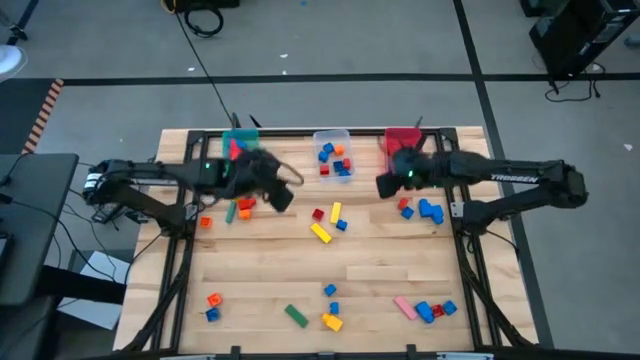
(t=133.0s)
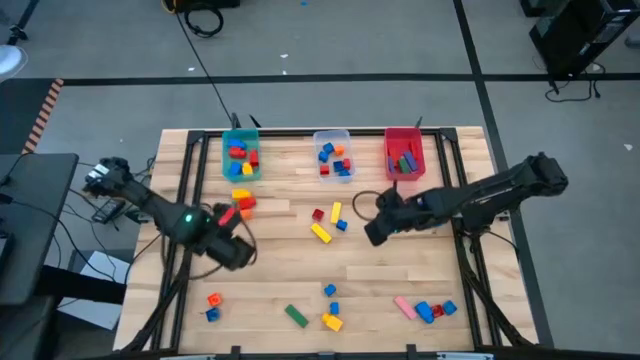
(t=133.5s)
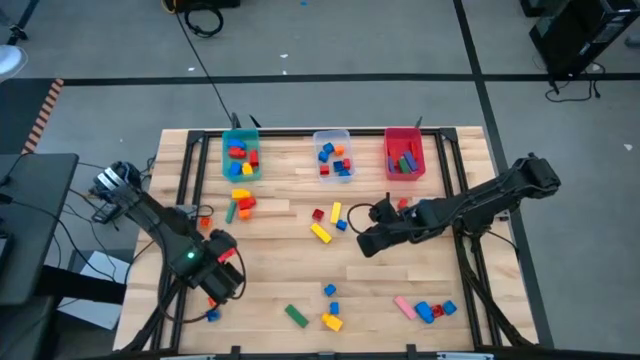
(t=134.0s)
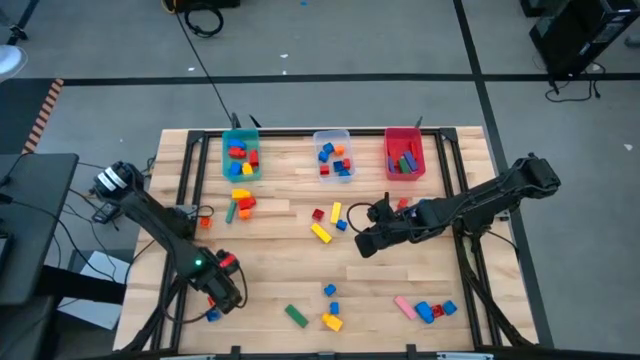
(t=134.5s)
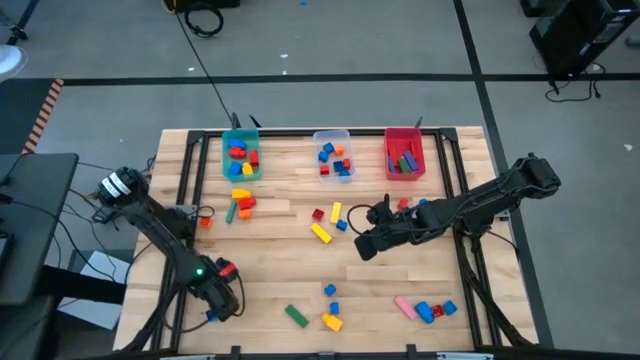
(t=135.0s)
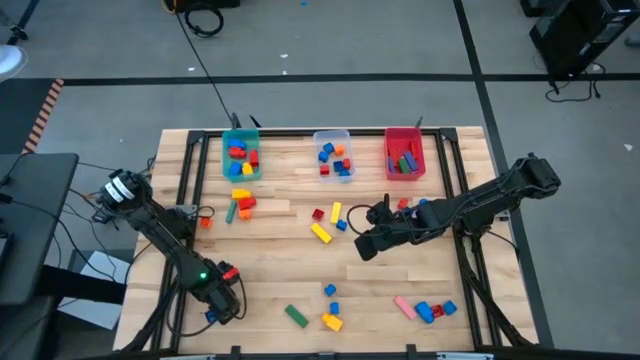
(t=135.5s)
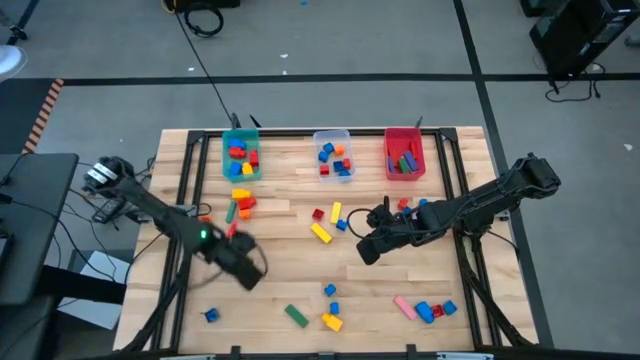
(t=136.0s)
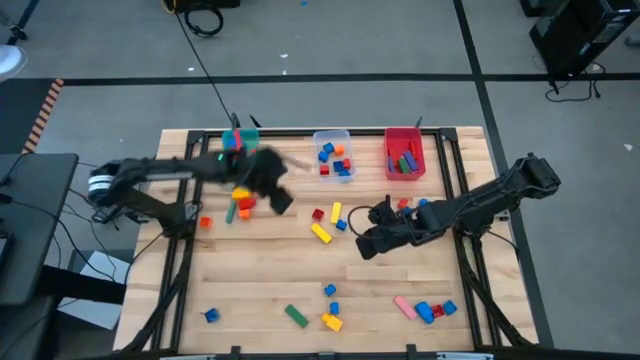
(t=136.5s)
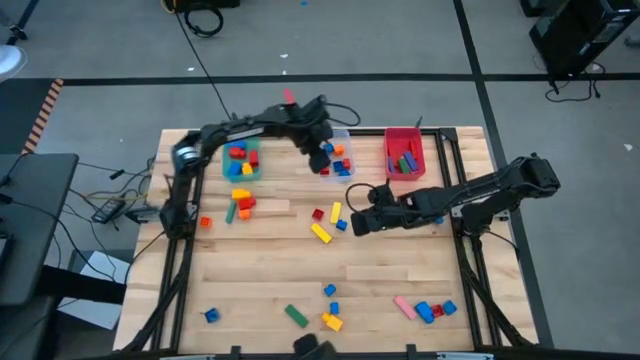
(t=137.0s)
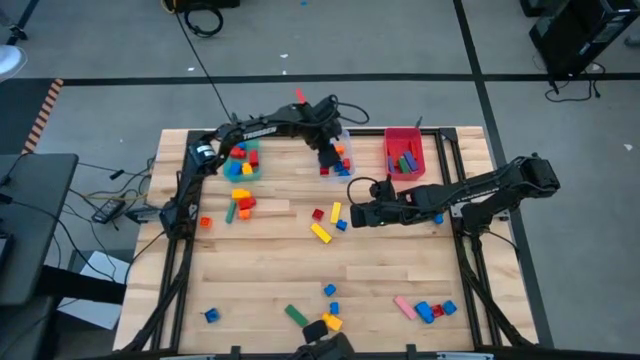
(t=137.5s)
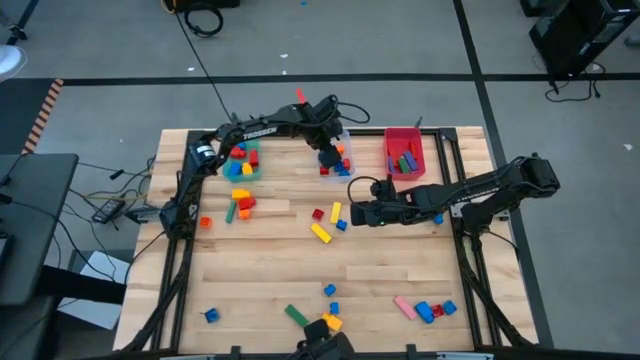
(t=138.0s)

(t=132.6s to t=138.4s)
Task: Sort blocks by size
Put the orange 4 stud game piece into the transparent bin

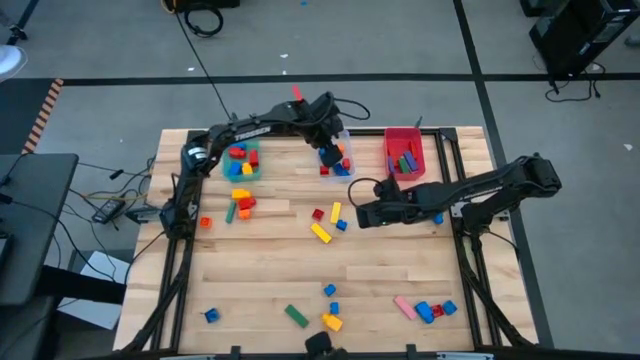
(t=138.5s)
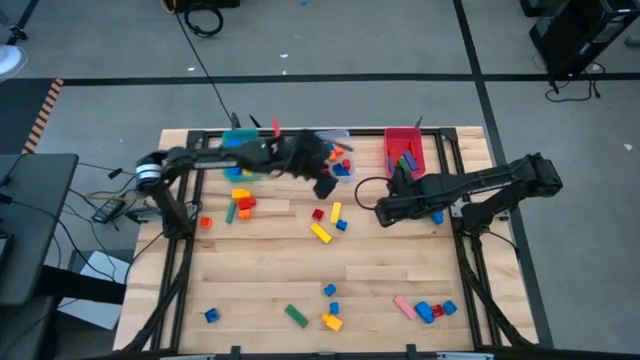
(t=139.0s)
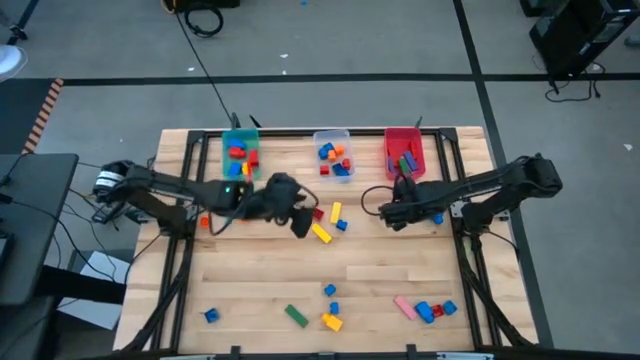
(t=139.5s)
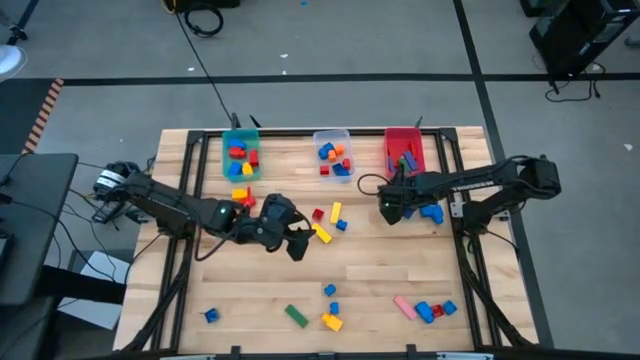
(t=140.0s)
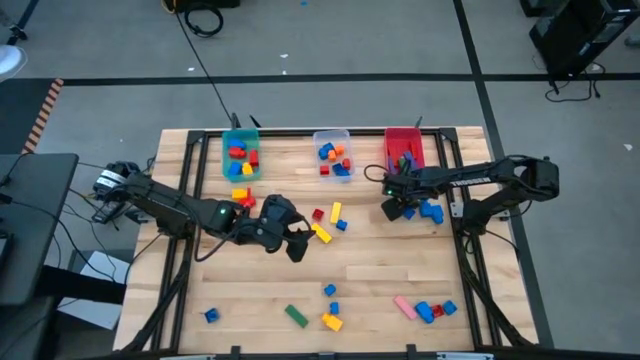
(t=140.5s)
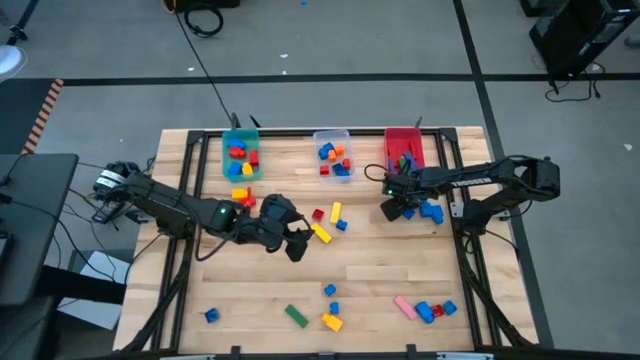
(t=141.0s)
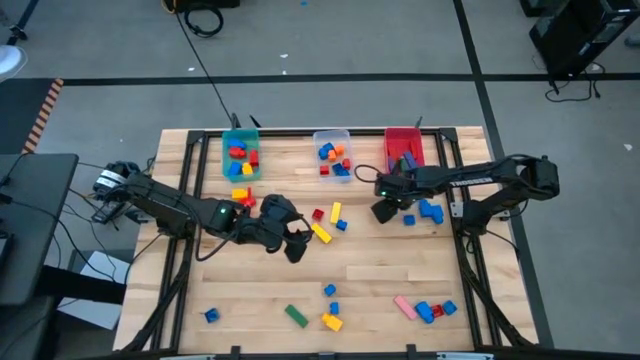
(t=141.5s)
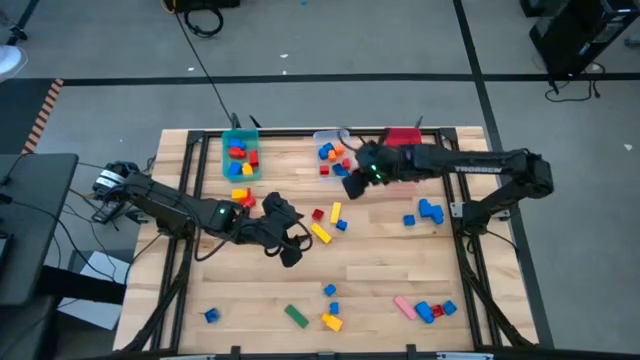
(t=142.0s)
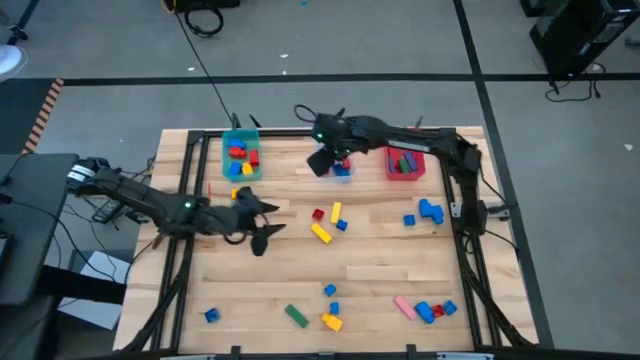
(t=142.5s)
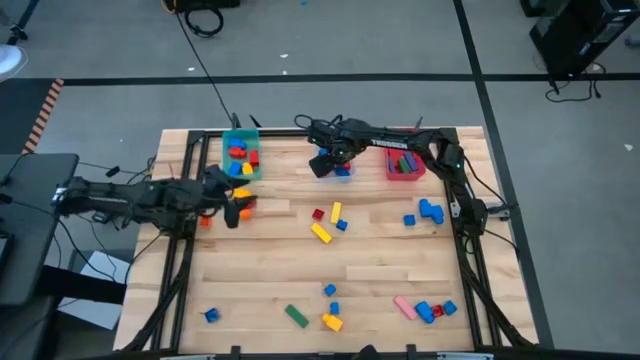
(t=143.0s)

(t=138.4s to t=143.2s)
Put the red 4 stud game piece into the transparent bin

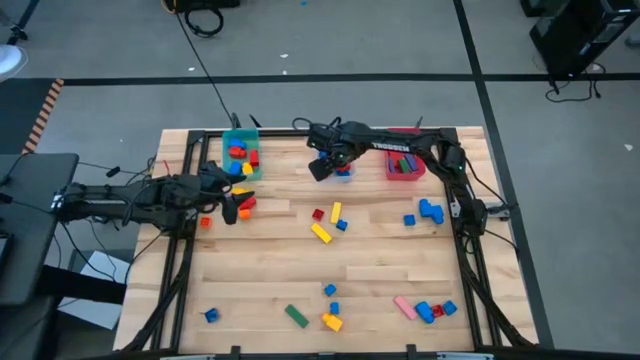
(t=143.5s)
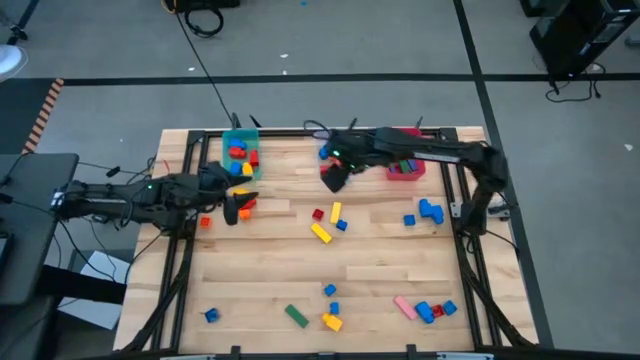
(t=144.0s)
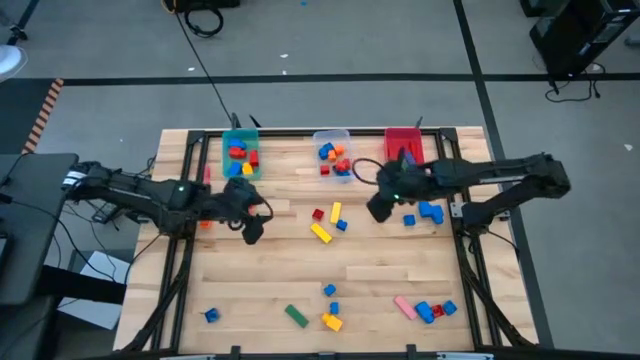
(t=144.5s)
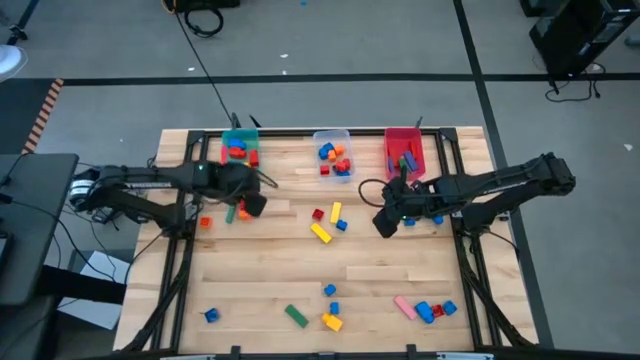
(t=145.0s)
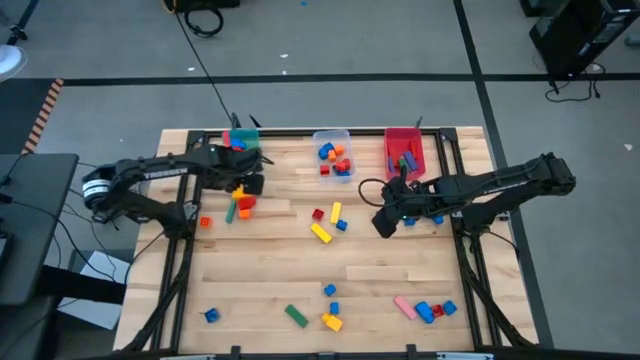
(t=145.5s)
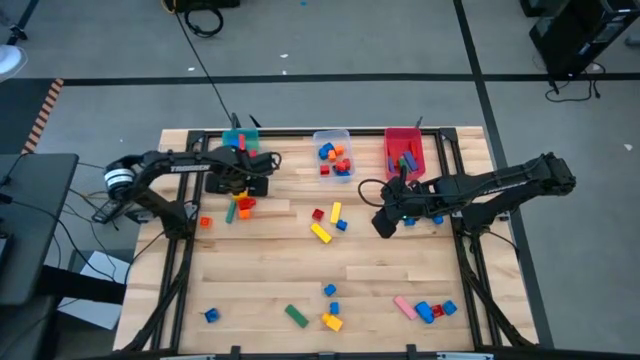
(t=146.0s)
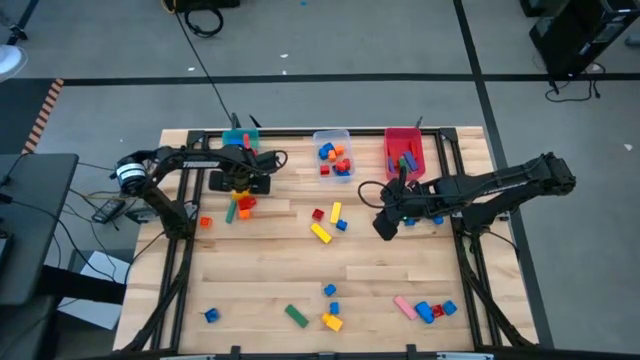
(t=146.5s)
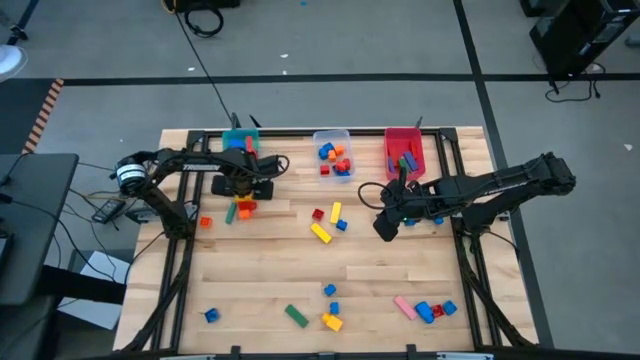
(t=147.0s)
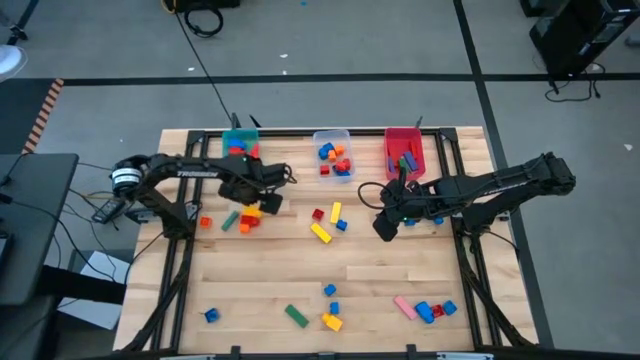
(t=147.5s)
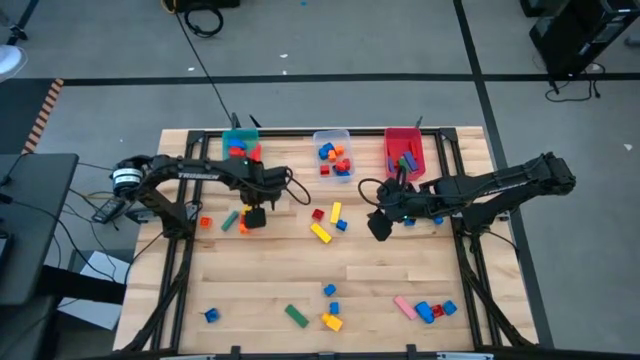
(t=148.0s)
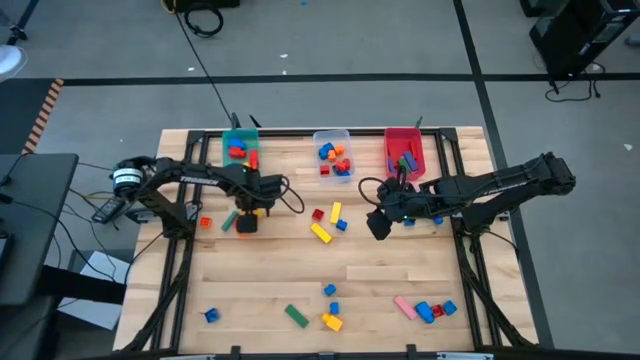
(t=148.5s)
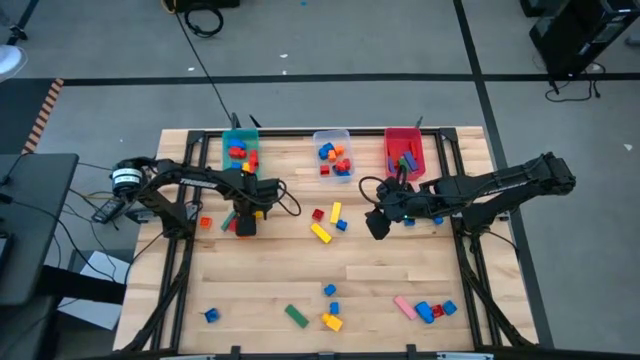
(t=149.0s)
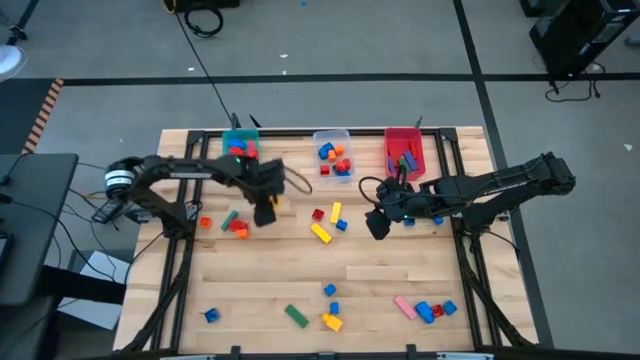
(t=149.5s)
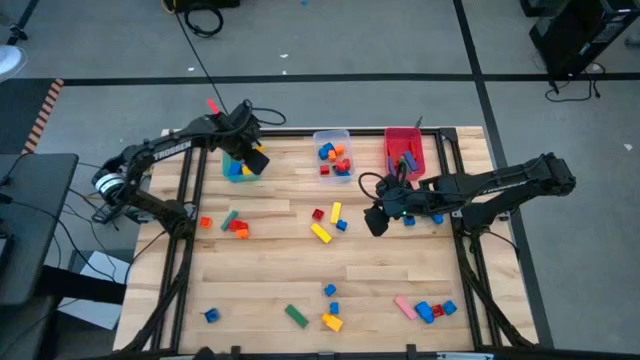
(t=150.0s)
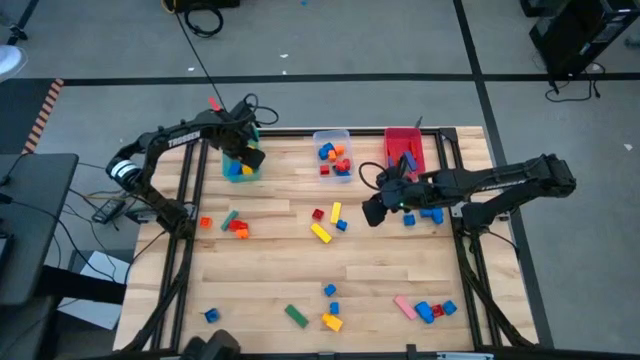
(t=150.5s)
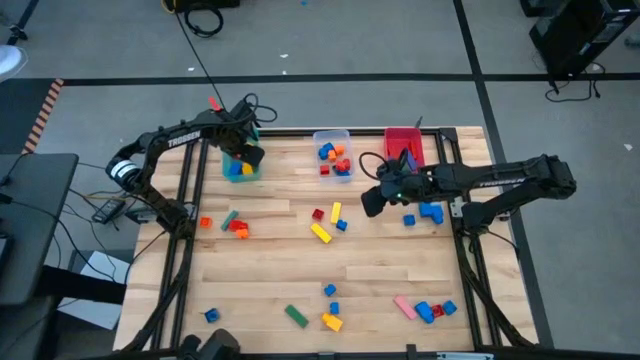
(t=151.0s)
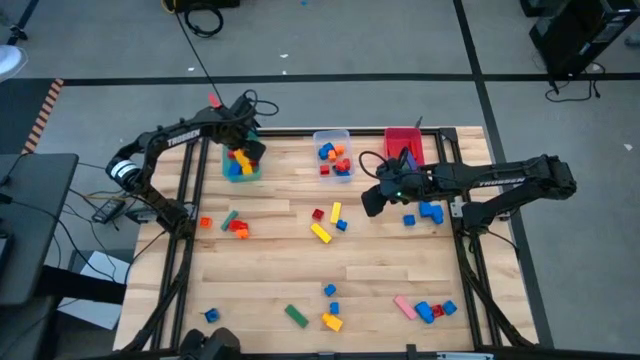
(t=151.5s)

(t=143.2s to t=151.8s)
Put the yellow 1 stud game piece into the blue bin

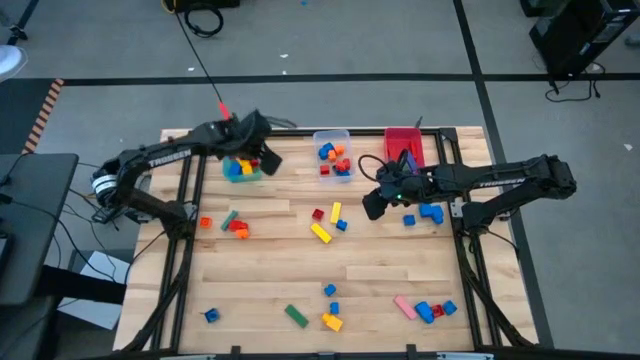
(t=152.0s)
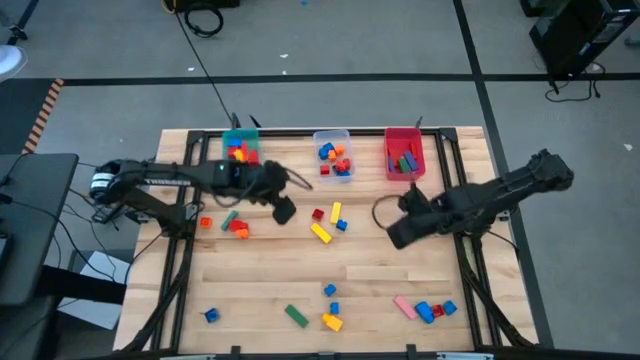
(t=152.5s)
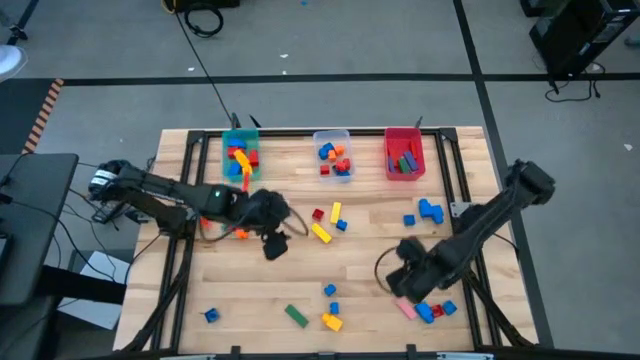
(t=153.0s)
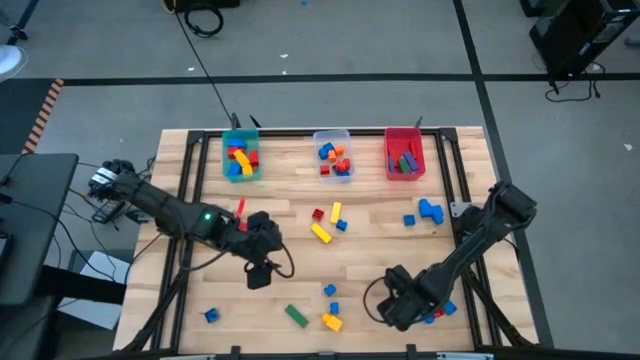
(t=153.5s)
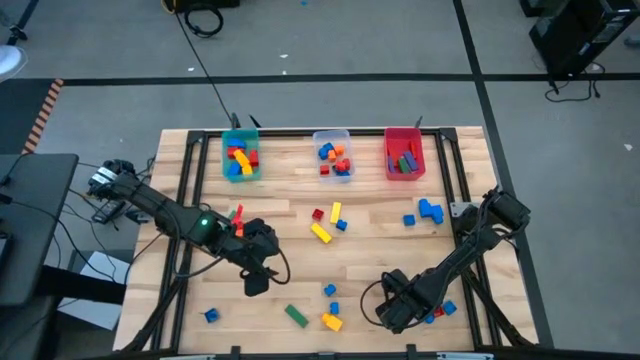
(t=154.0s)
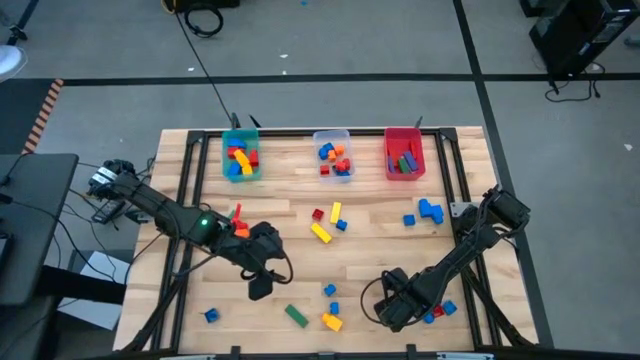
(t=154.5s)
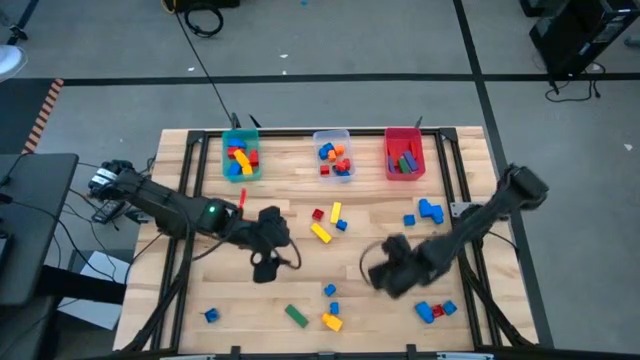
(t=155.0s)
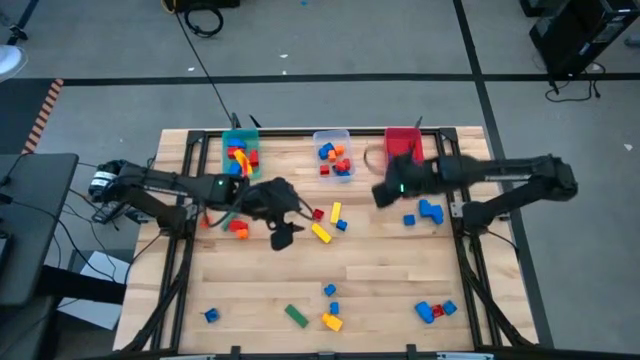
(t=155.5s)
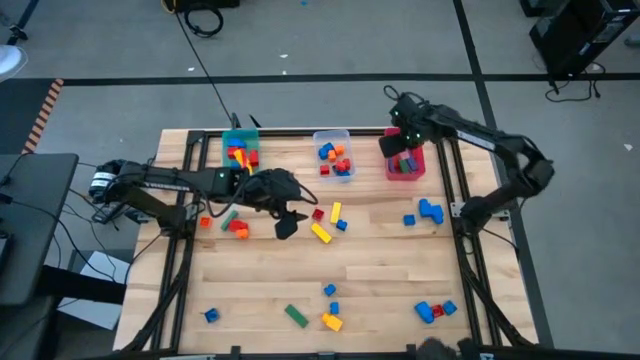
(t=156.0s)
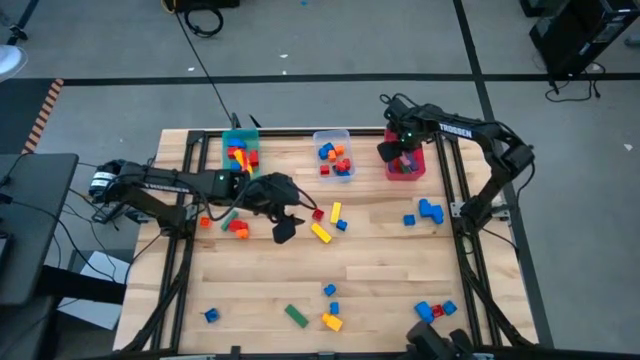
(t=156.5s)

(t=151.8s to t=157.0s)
Put the pink block into the red bin
